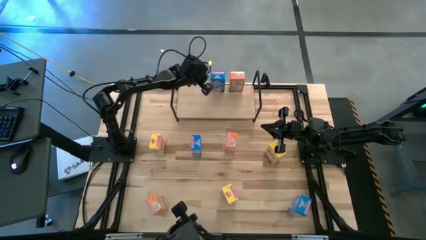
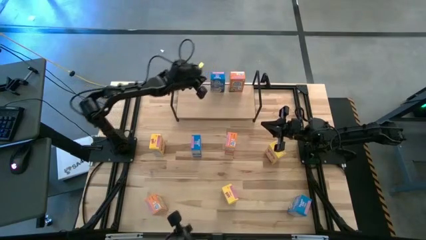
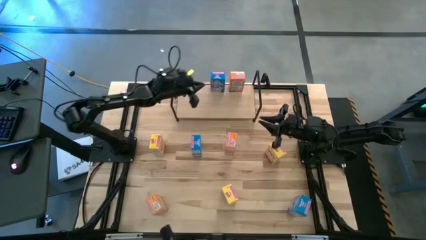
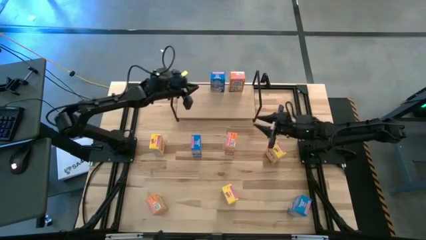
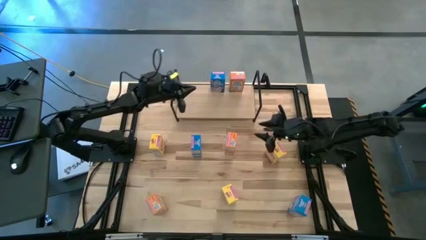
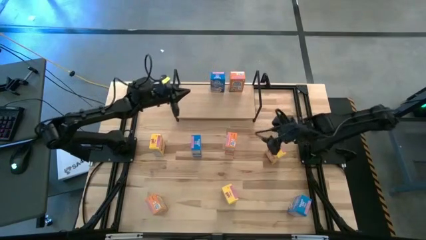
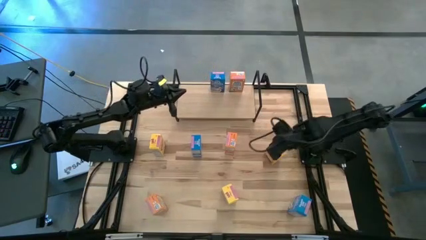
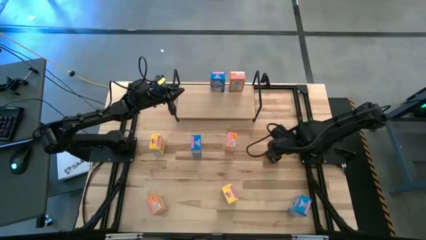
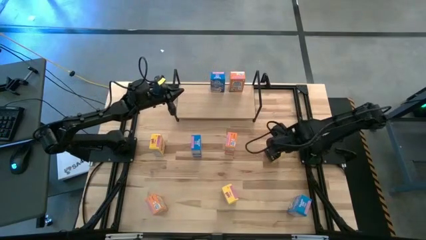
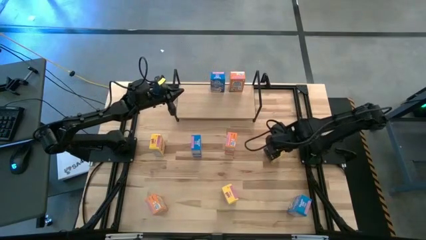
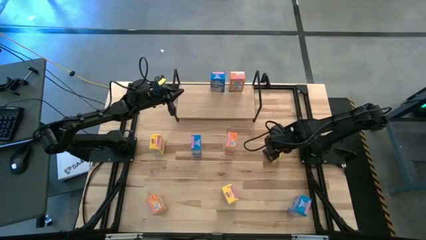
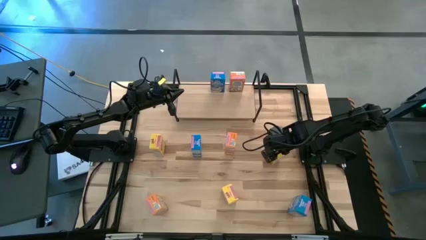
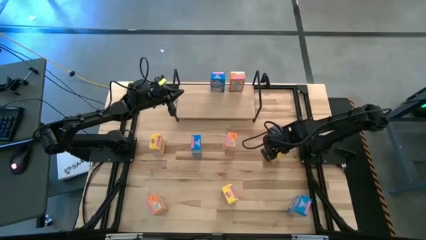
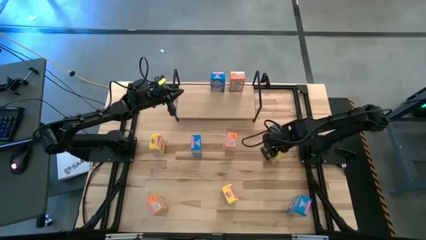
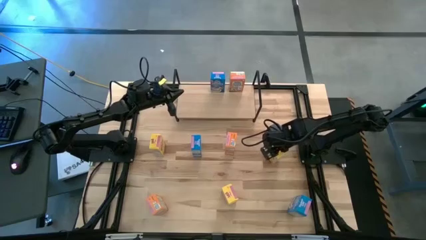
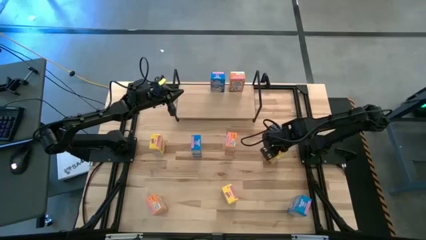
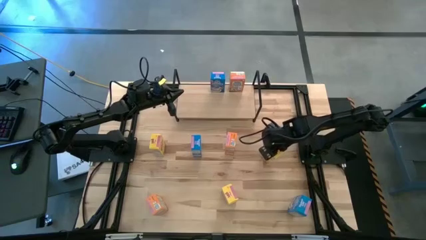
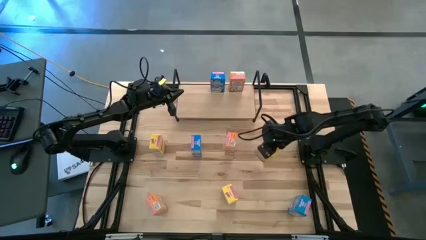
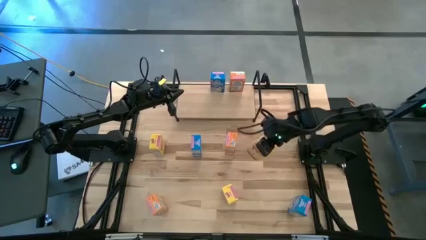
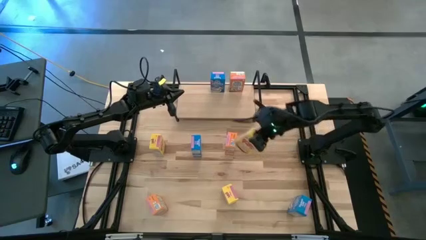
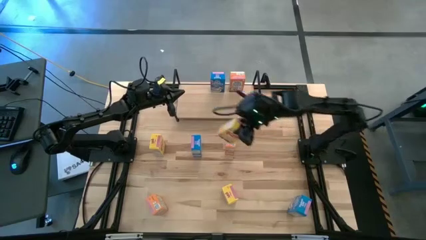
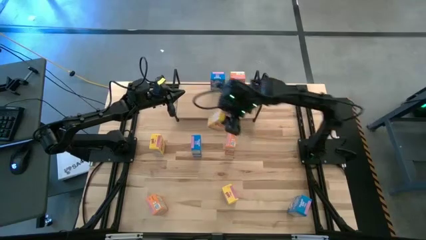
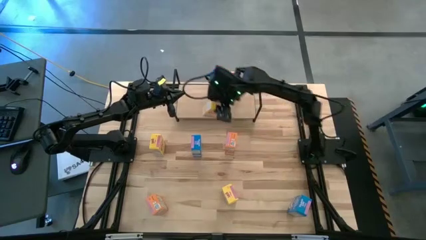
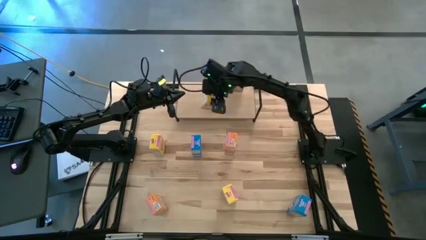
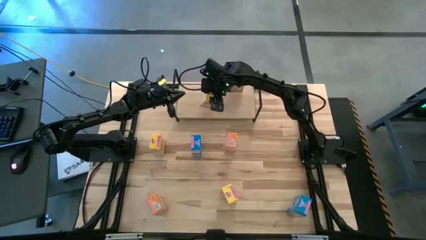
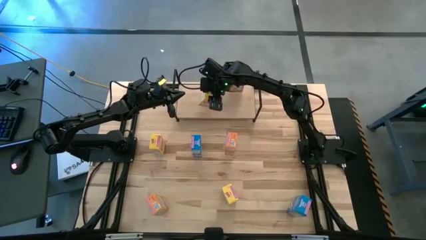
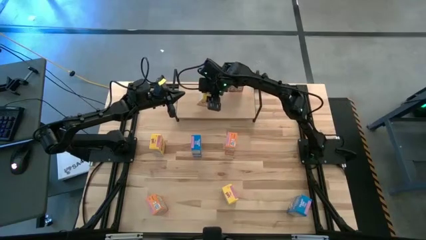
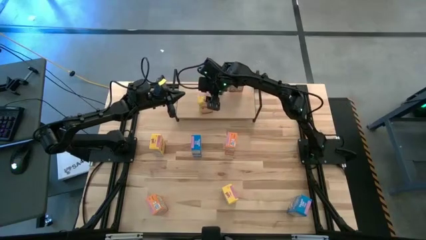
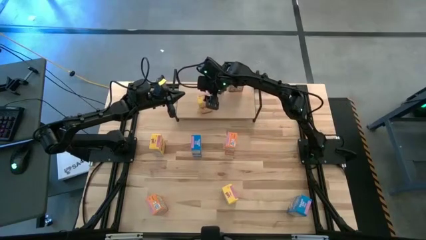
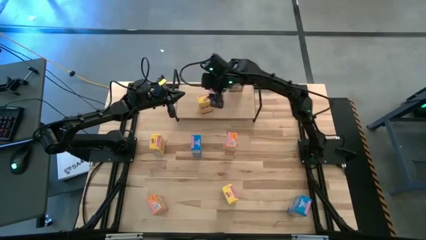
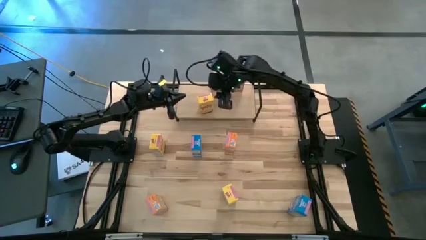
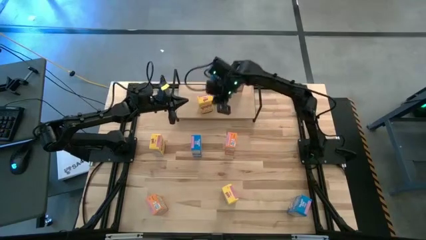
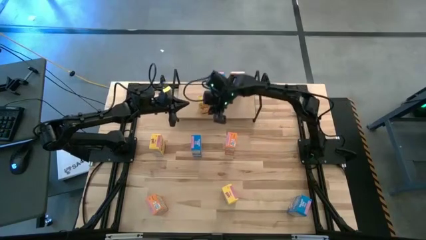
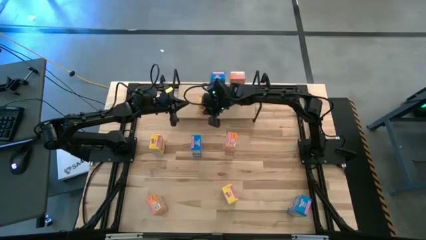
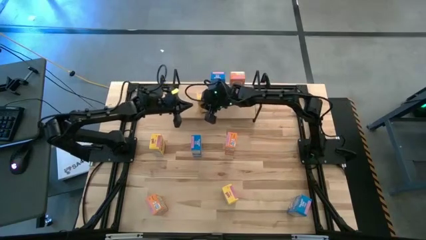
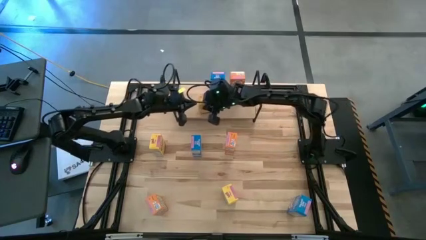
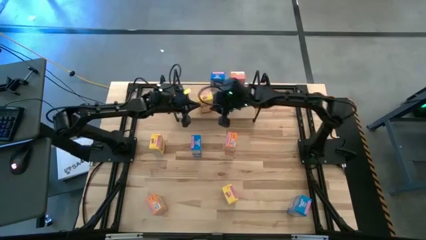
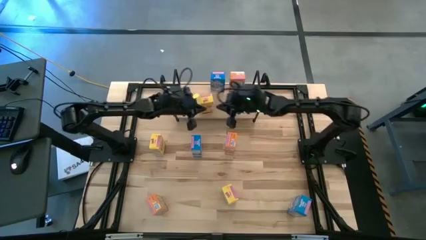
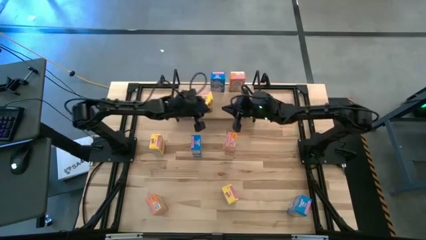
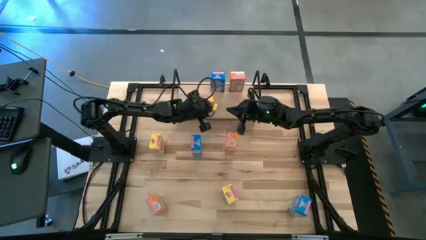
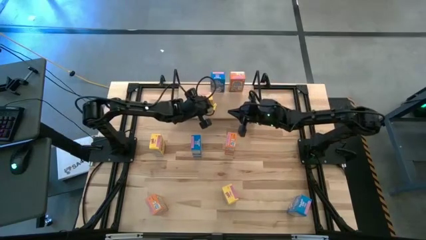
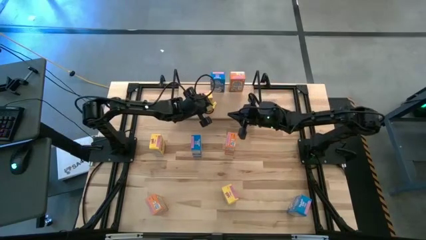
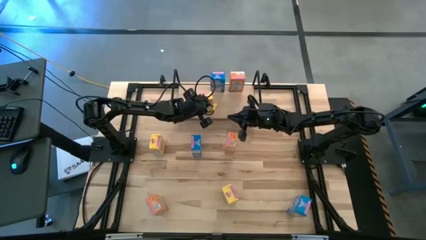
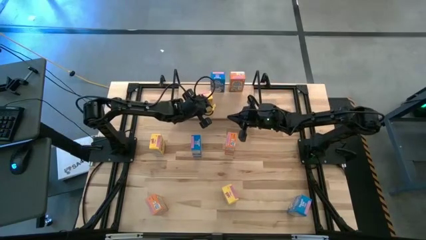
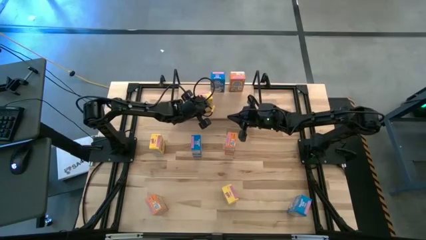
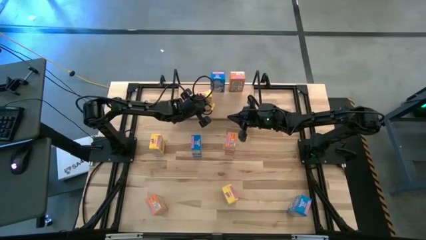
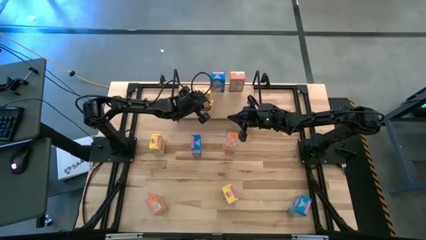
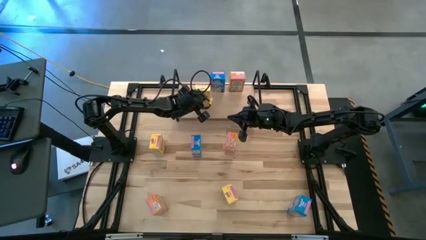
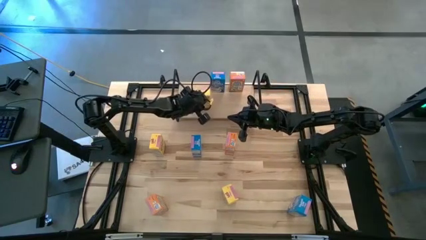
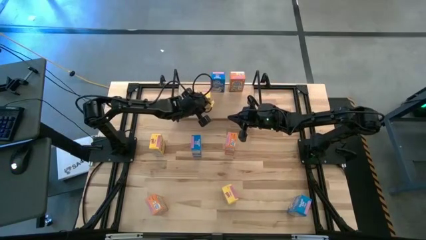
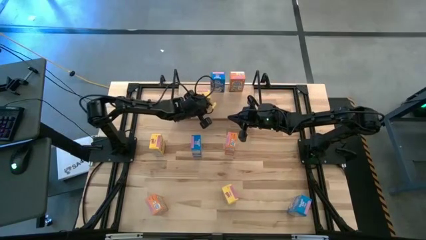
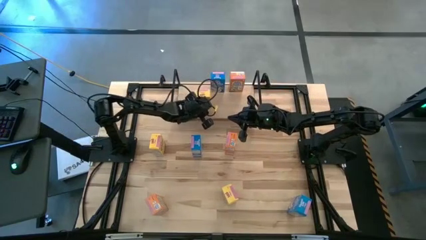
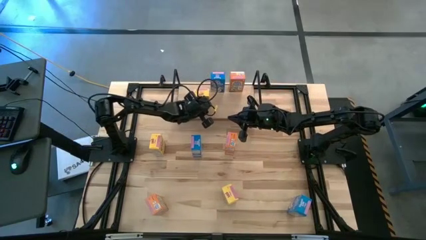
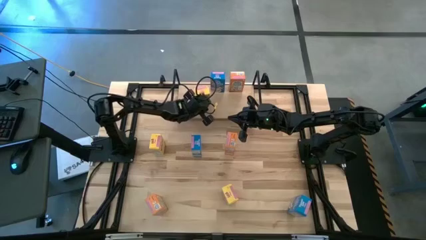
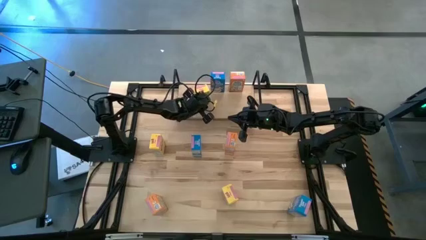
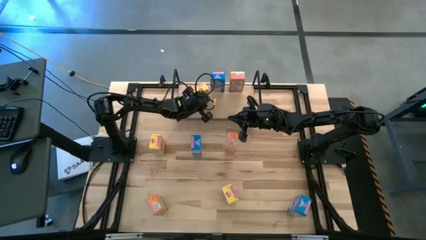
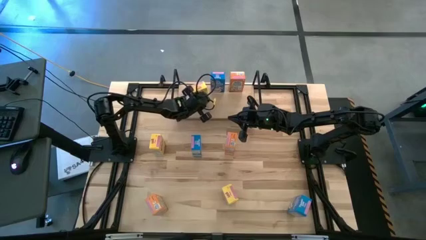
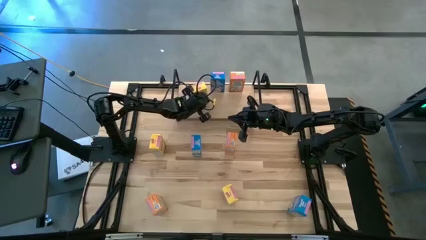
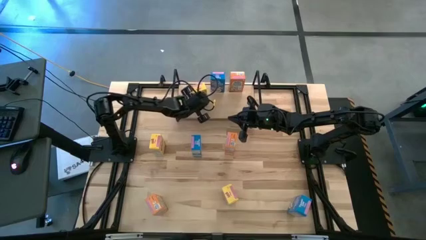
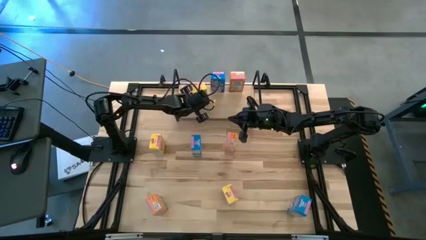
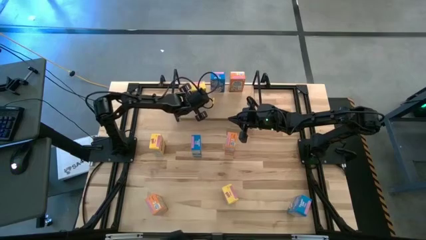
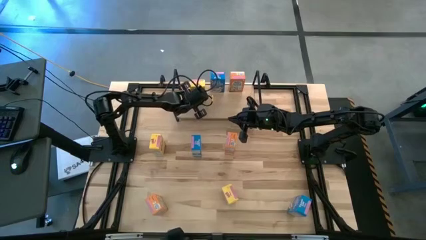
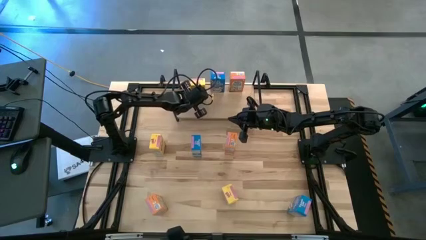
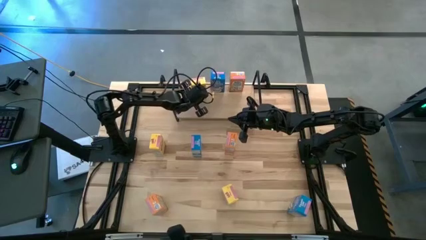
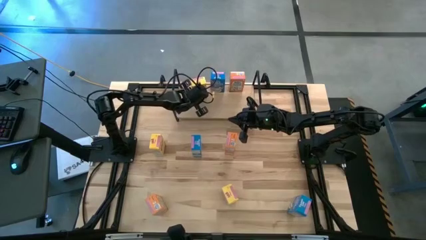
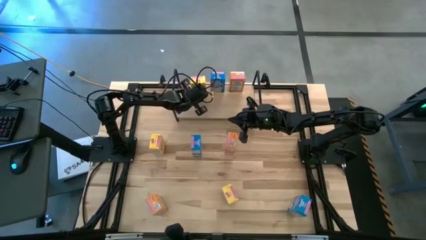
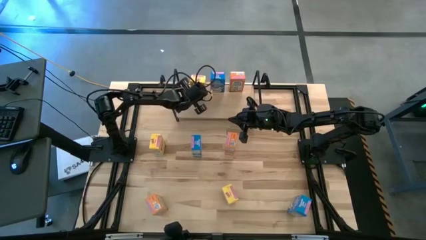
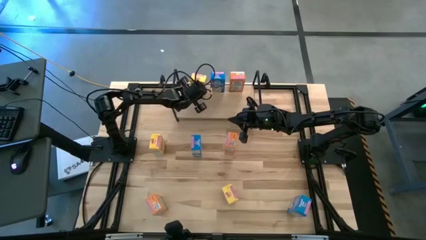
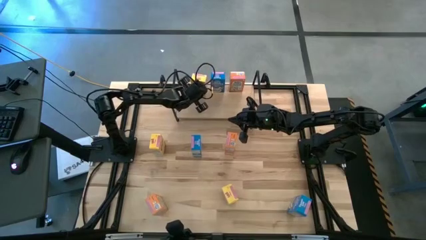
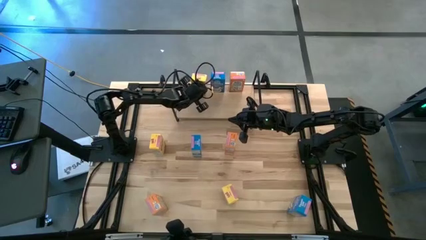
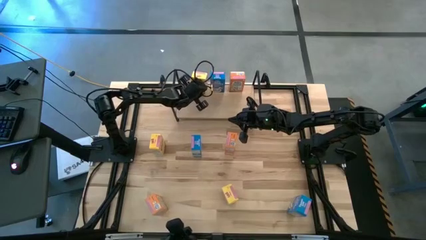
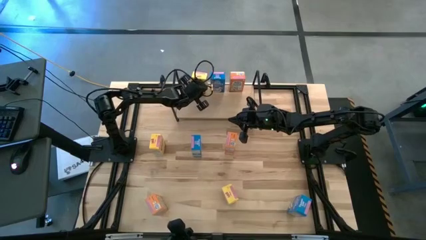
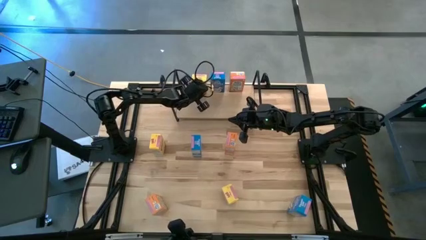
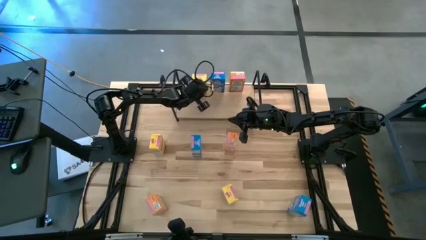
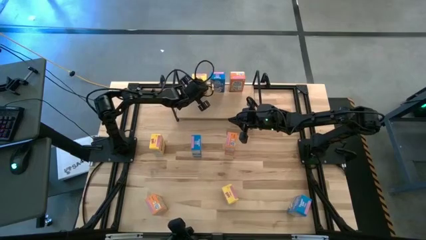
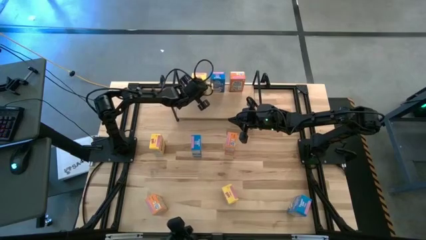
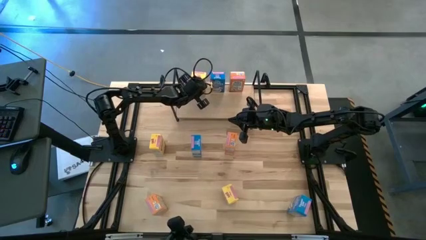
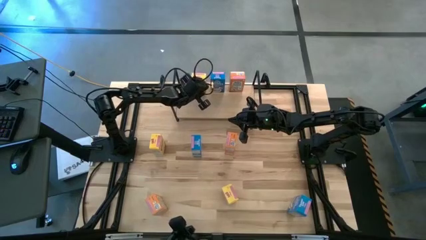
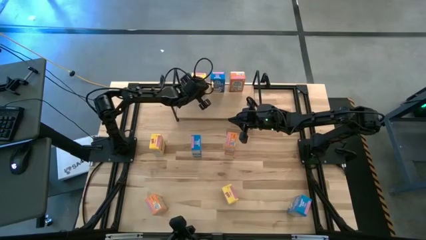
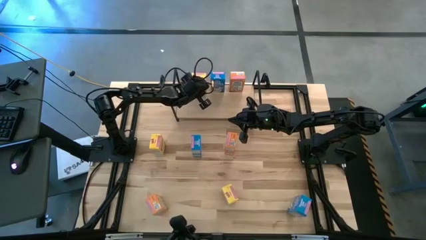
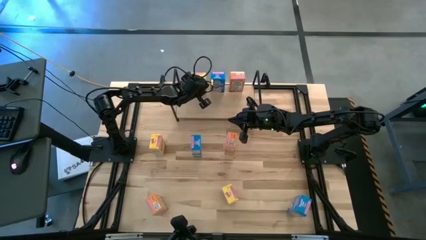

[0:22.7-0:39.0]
Task: Stack cereal on shelf
Put the top right yellow cereal box on the shelf
